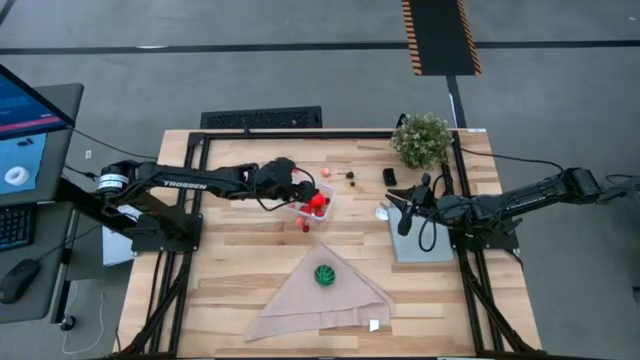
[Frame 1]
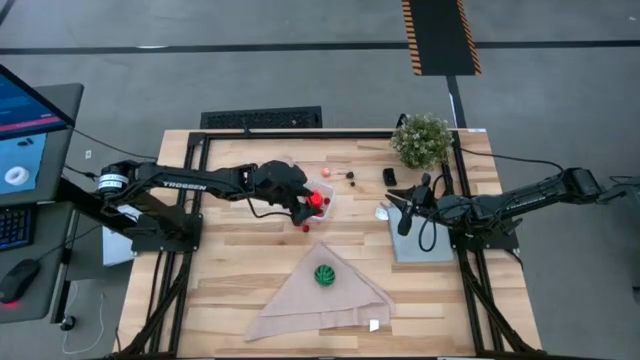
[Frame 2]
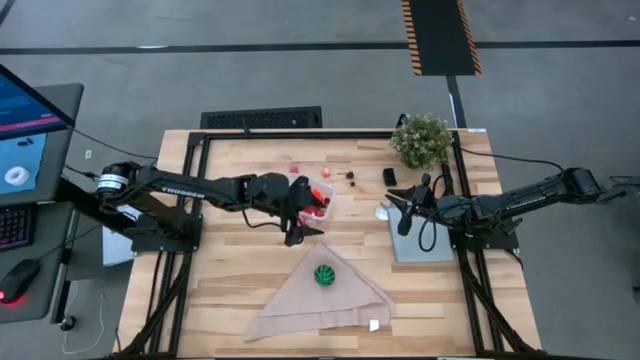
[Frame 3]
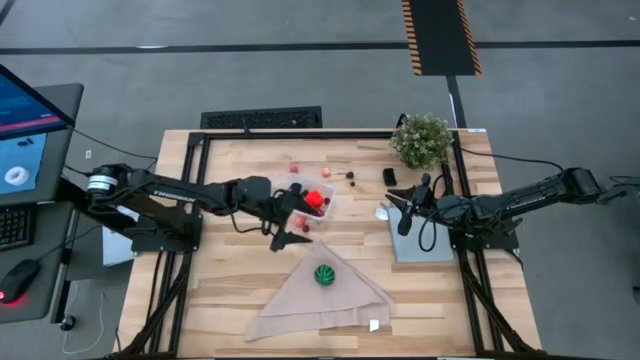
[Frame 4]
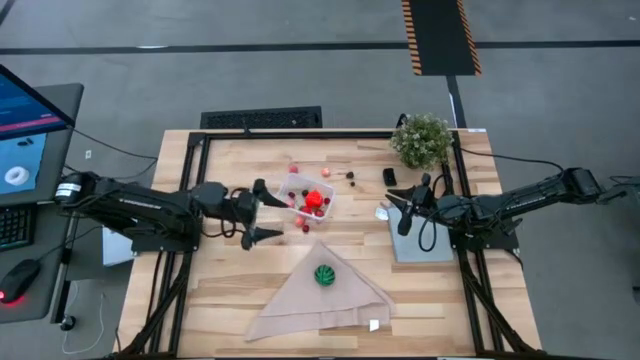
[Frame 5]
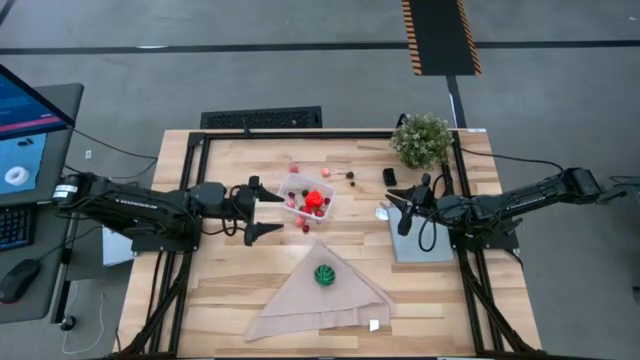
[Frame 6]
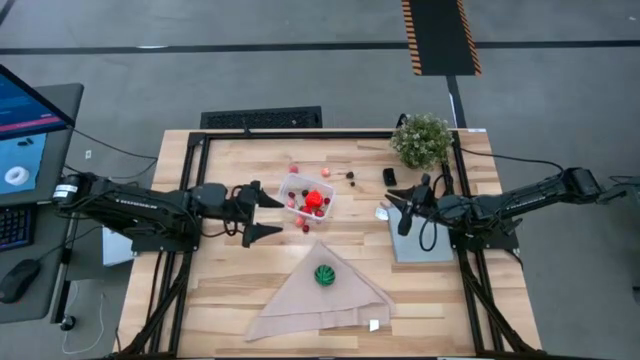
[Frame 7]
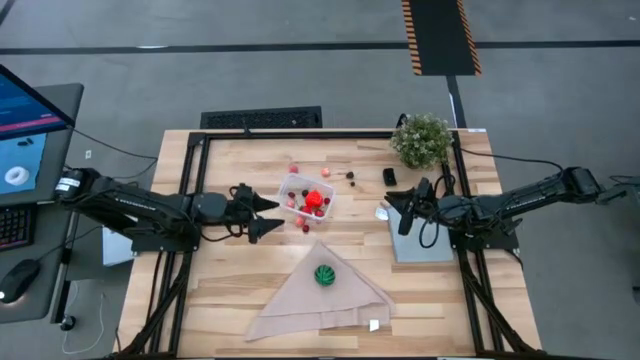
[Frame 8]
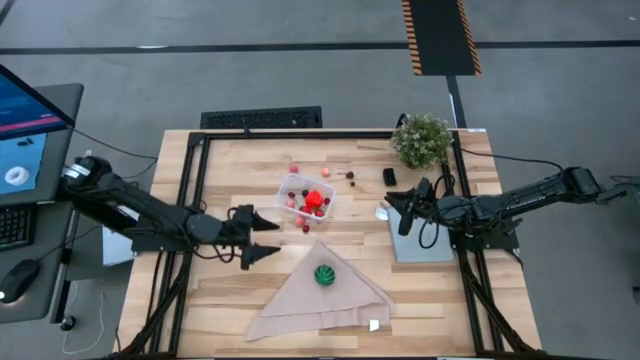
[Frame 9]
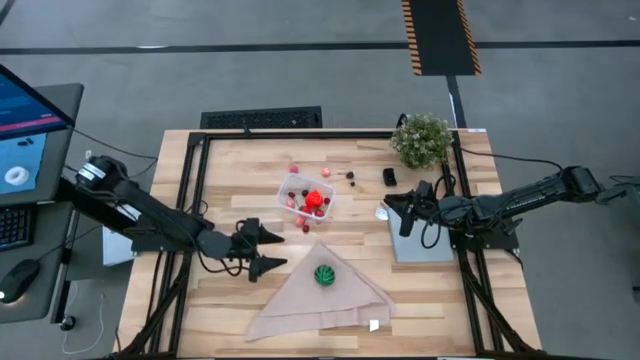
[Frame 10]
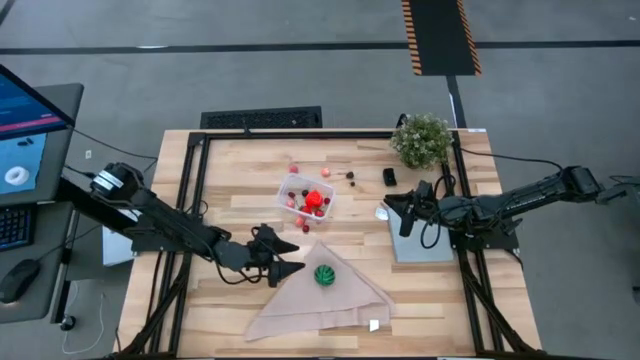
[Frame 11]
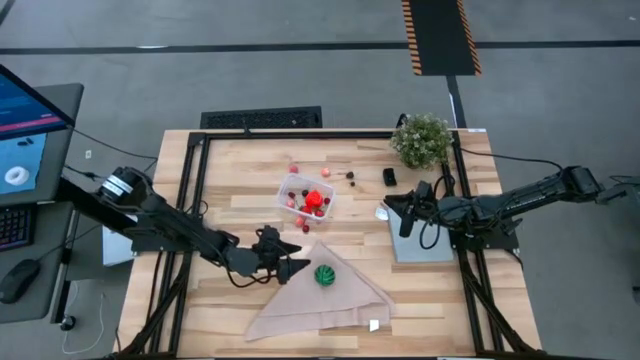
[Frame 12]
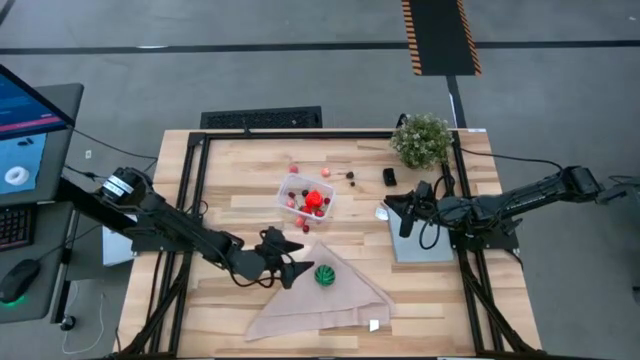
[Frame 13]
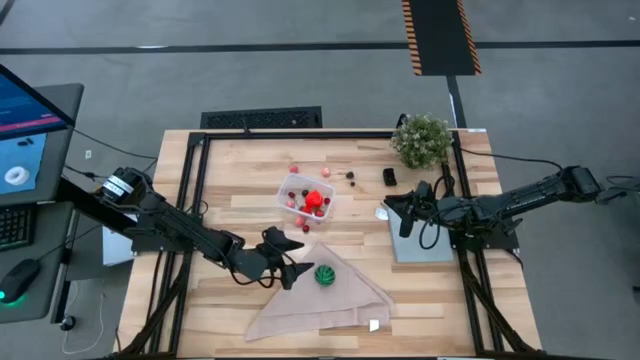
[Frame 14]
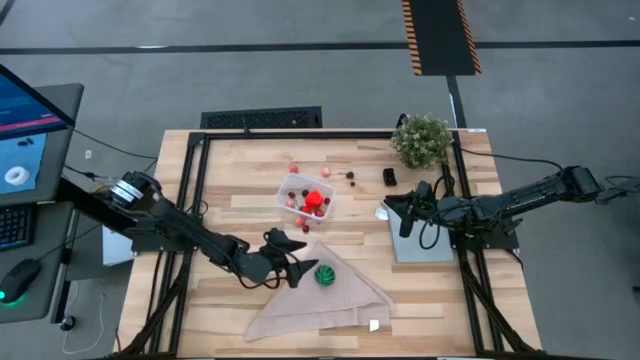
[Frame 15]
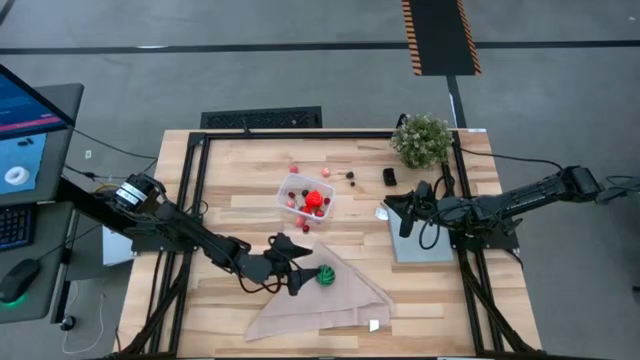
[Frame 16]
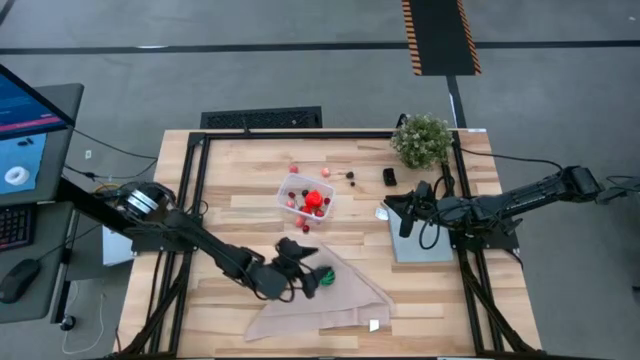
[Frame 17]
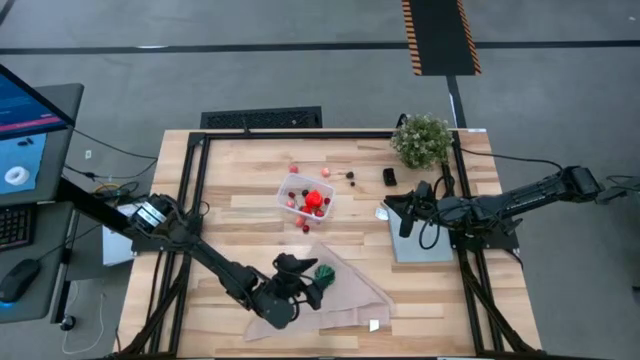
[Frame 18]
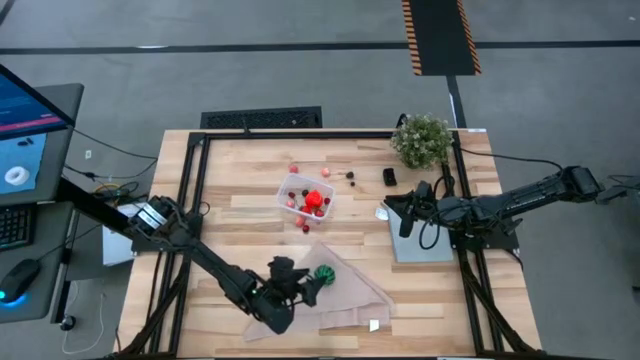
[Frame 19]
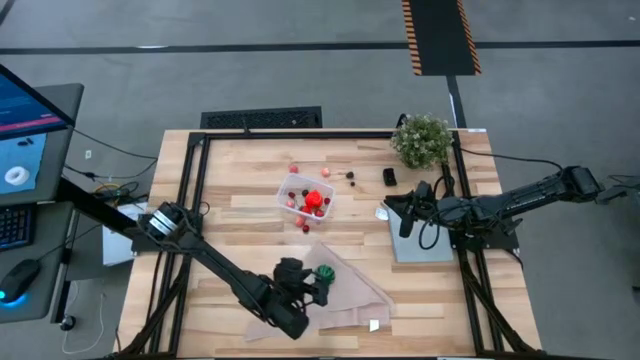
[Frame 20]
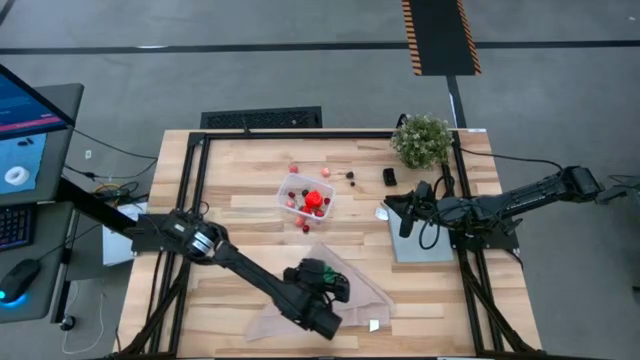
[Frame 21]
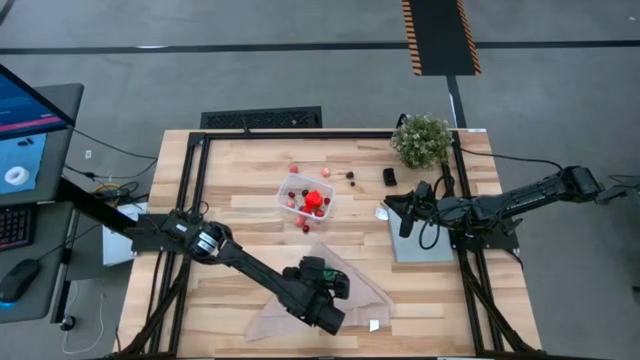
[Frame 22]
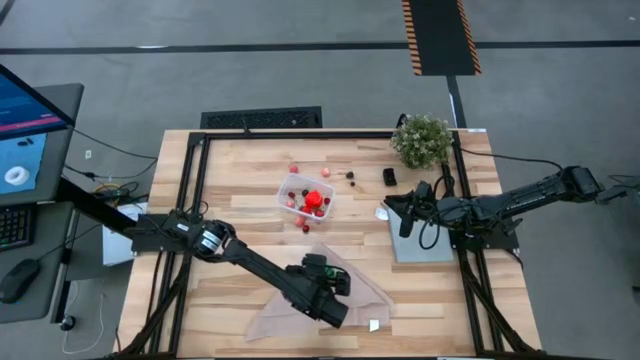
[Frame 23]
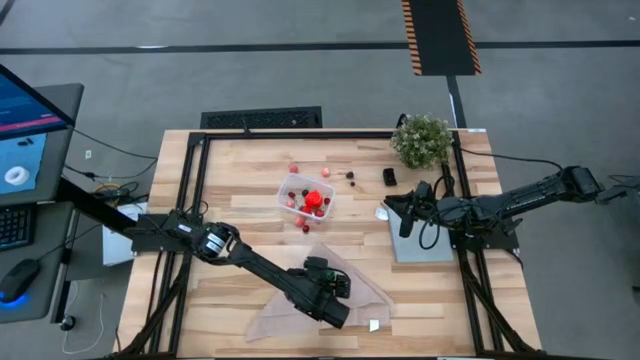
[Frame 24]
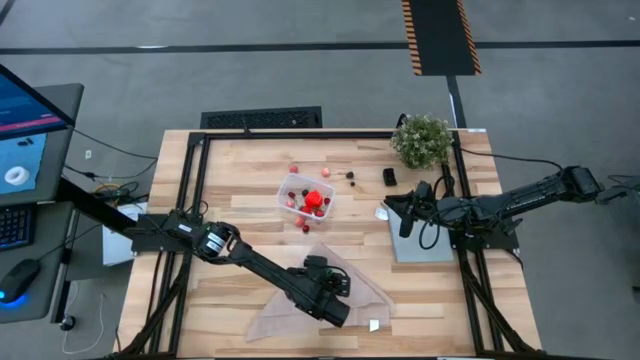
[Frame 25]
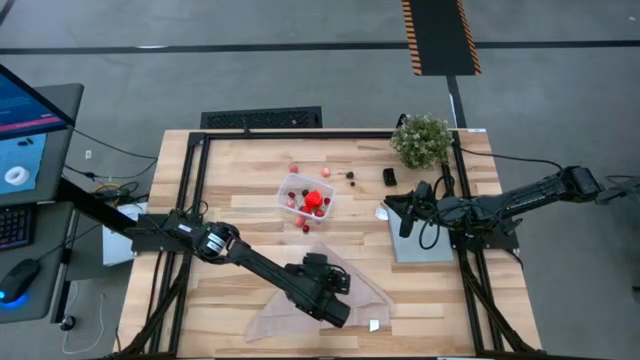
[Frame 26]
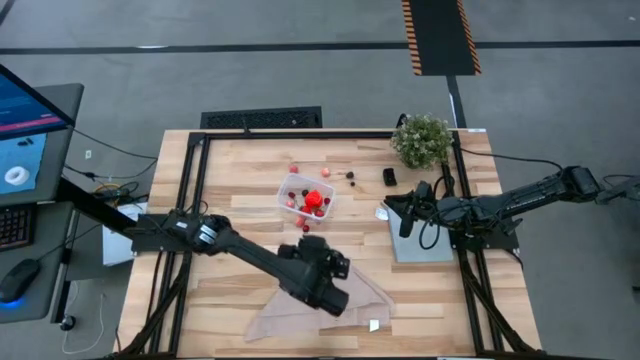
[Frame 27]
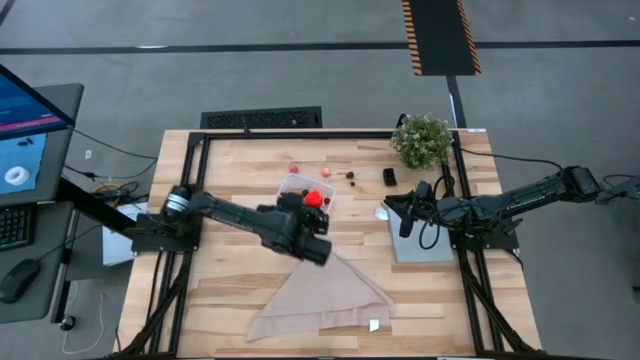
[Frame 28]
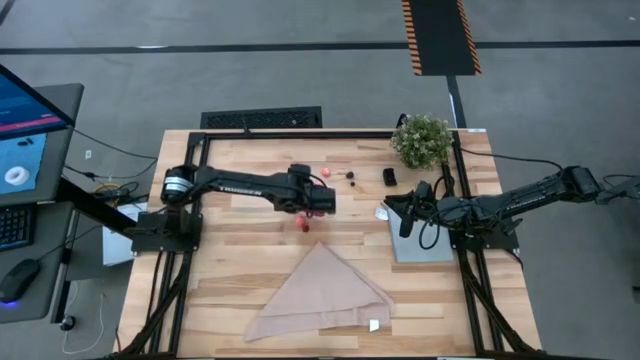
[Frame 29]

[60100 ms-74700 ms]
Task: Pick and placing Produce into tupperware
Put the watermelon into the transparent bin

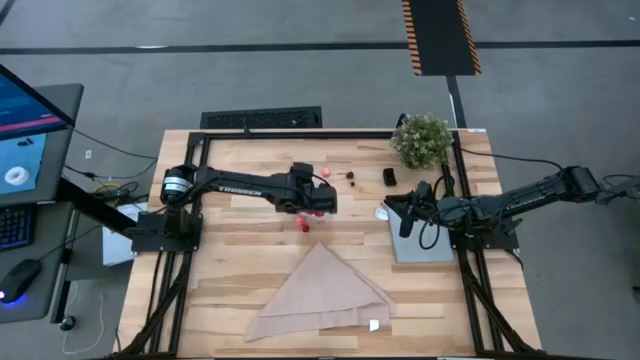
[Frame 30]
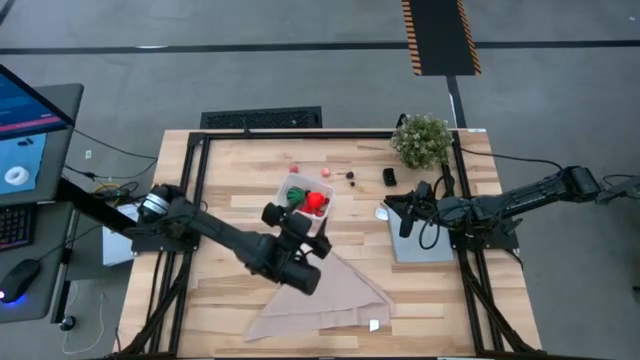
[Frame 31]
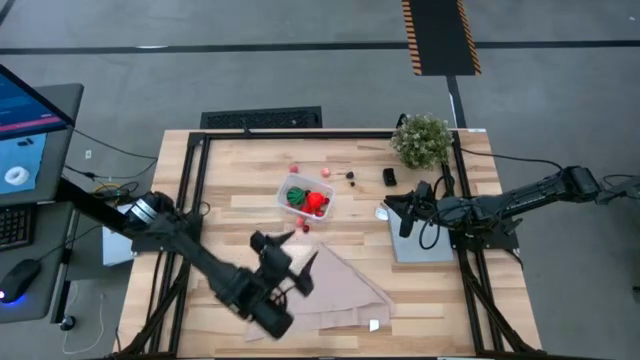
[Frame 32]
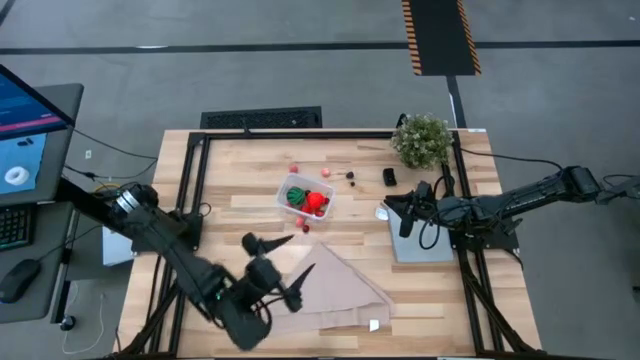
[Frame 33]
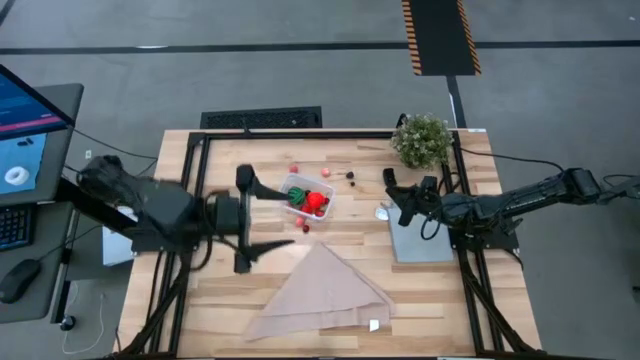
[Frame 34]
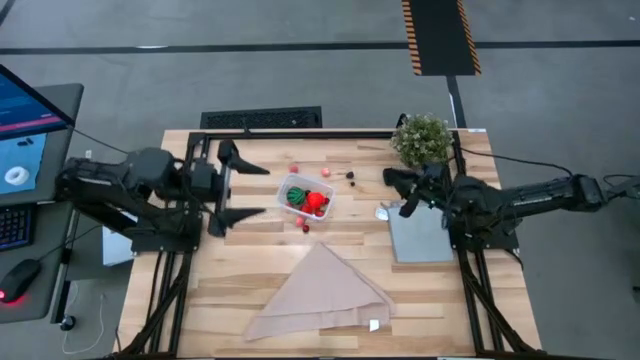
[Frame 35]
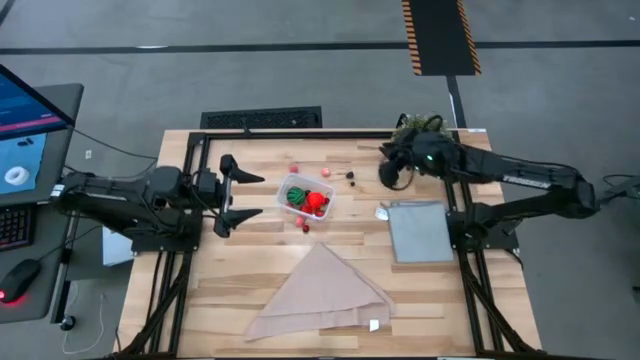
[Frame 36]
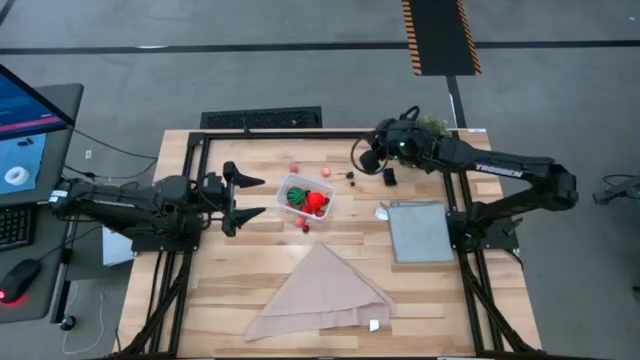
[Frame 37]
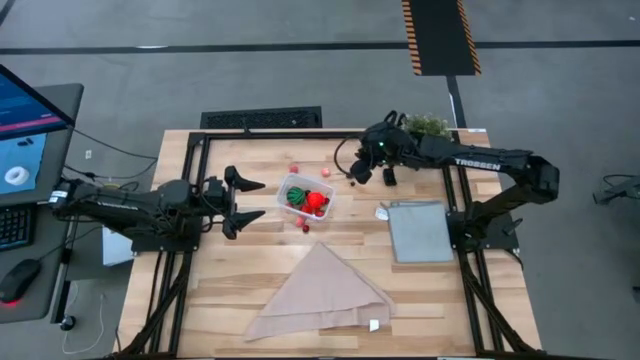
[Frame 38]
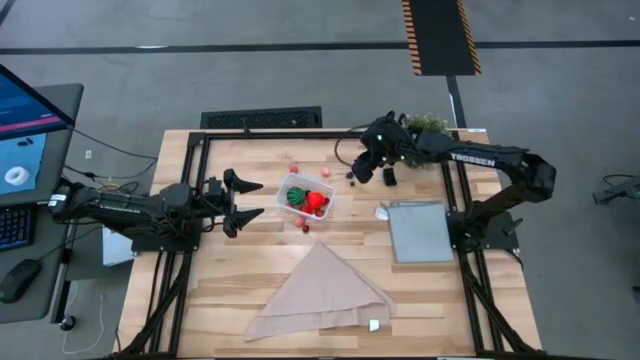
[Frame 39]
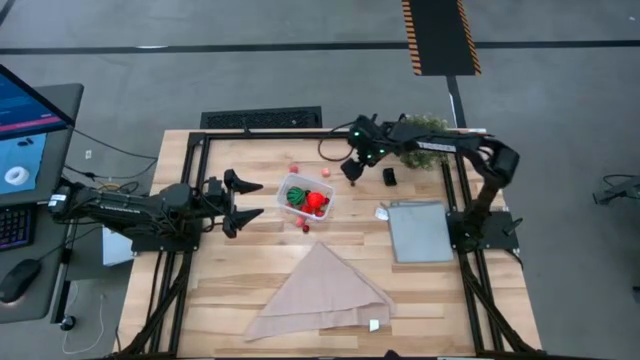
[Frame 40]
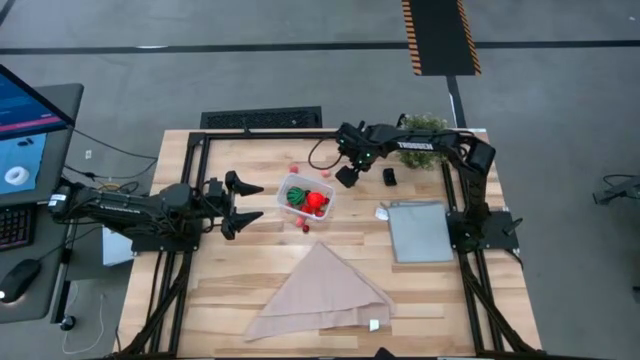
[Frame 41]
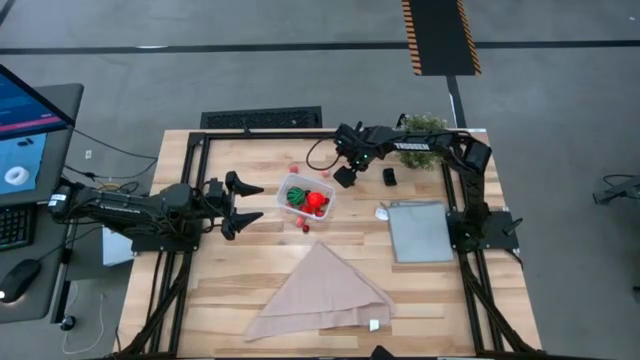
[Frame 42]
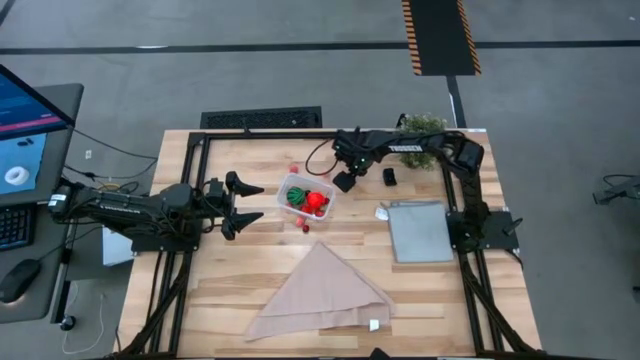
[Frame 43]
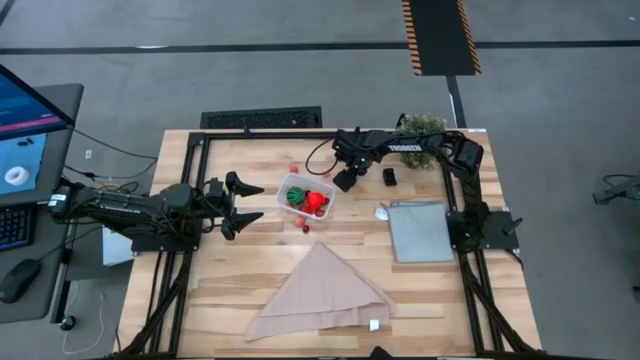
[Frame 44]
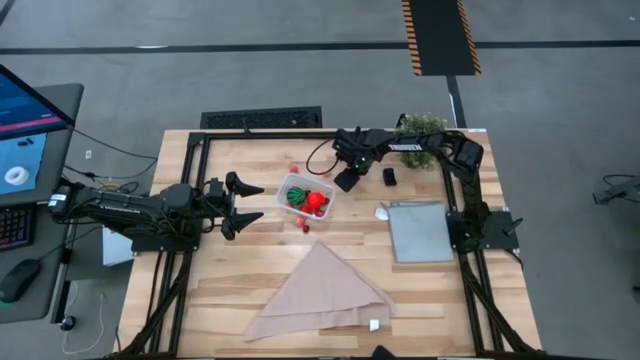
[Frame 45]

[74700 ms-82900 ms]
Put the blackberry into the transparent bin

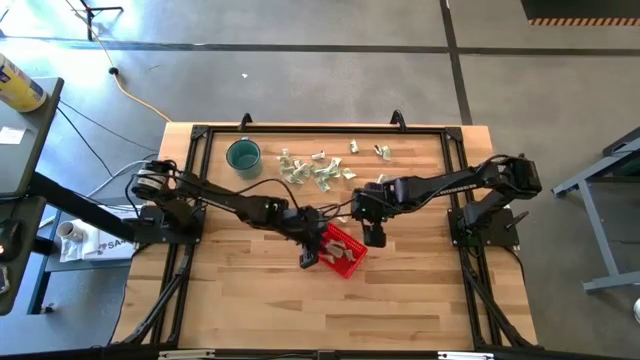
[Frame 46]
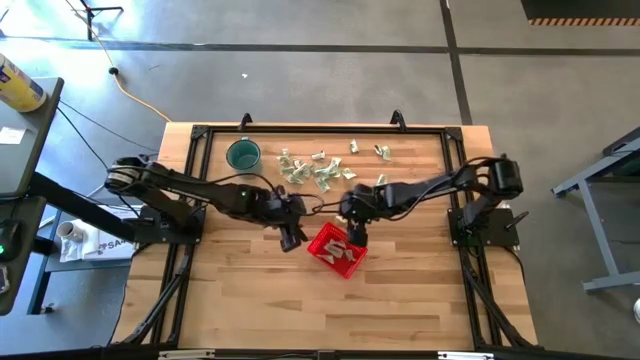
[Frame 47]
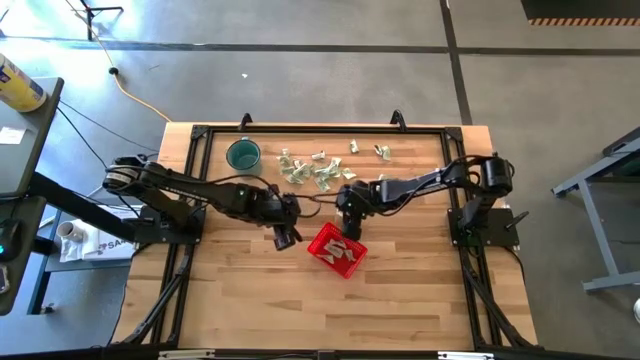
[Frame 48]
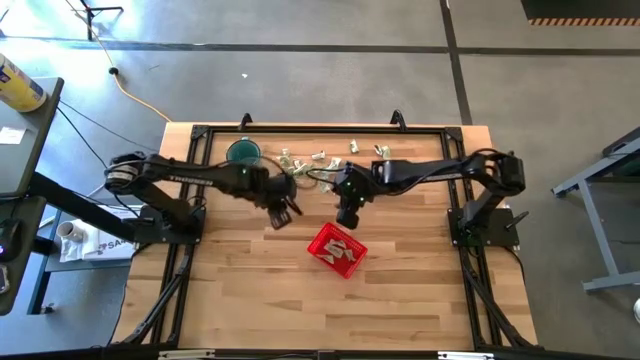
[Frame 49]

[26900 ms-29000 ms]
Task: Pick and place Stevia / Truvia into bins
Put the light green stevia packet into the bin
